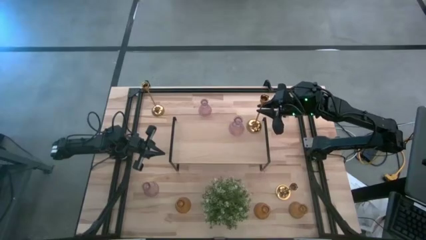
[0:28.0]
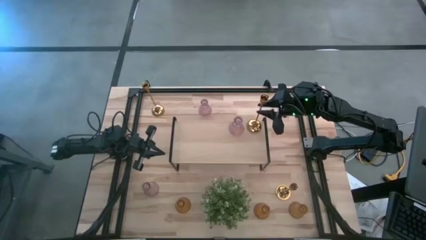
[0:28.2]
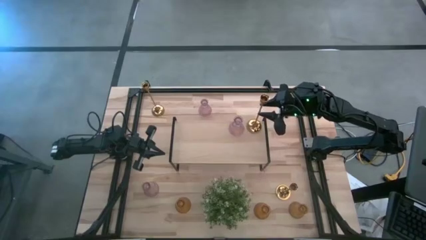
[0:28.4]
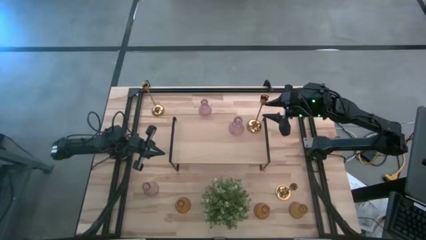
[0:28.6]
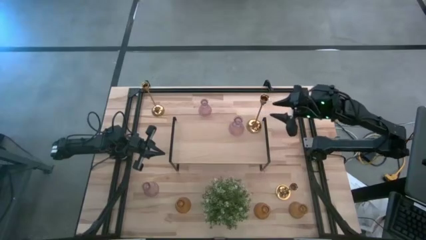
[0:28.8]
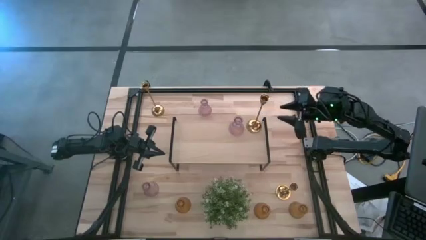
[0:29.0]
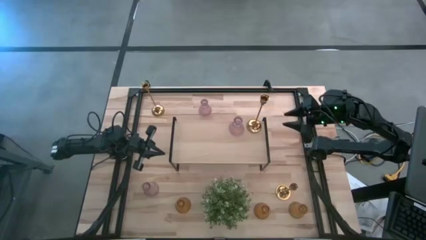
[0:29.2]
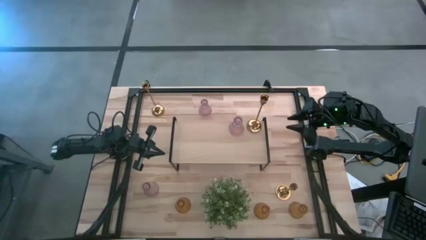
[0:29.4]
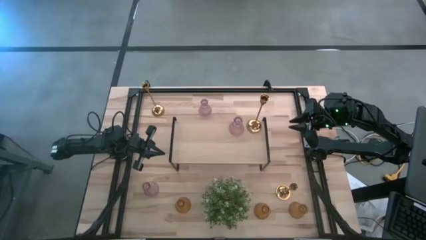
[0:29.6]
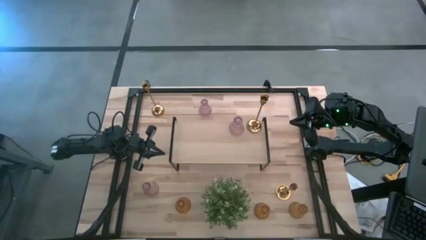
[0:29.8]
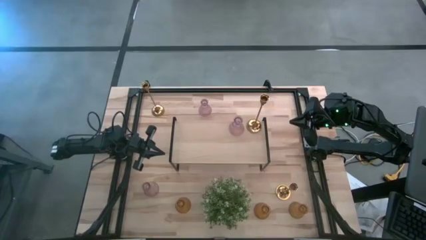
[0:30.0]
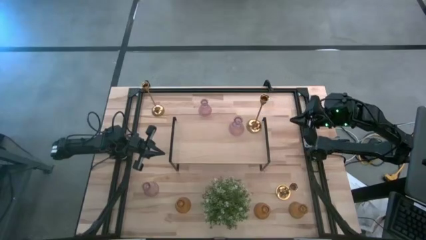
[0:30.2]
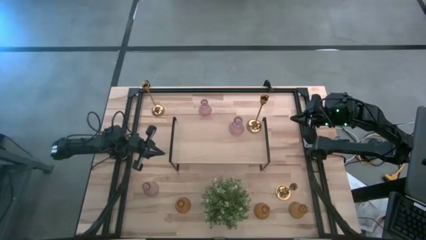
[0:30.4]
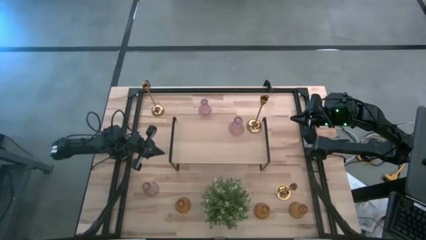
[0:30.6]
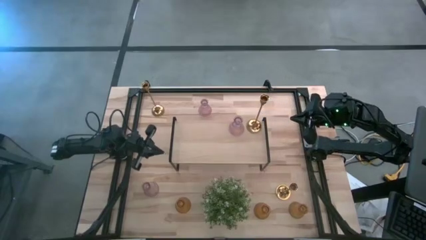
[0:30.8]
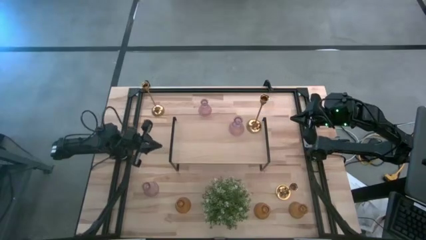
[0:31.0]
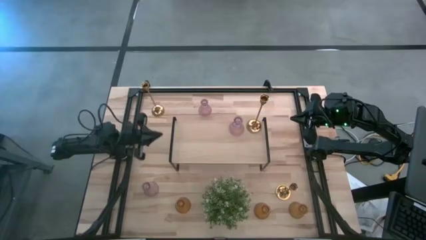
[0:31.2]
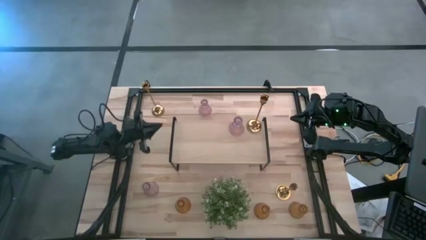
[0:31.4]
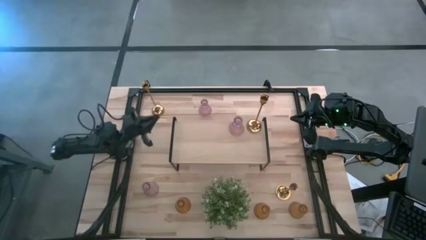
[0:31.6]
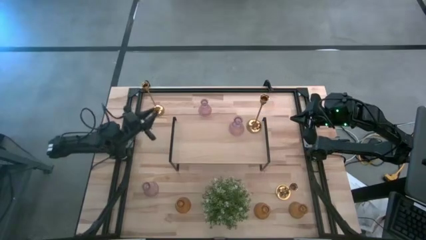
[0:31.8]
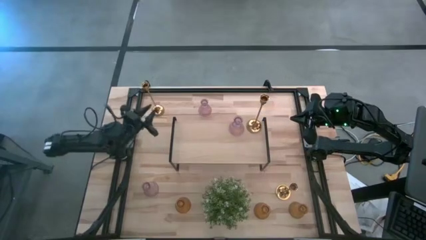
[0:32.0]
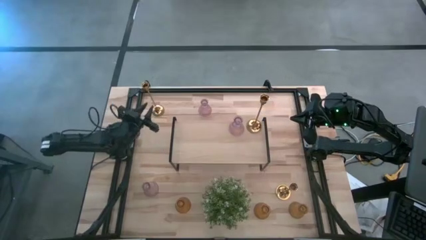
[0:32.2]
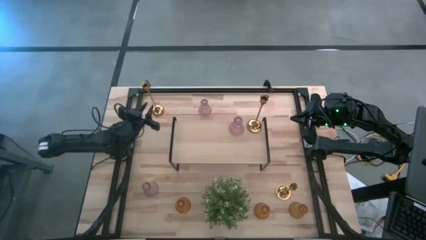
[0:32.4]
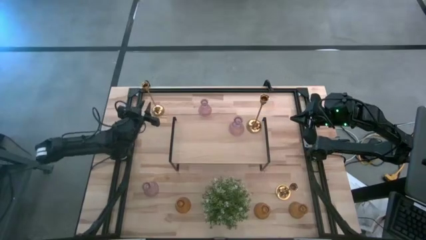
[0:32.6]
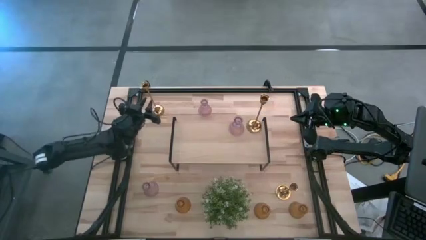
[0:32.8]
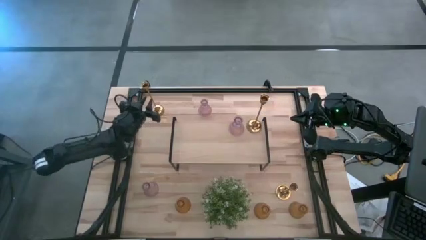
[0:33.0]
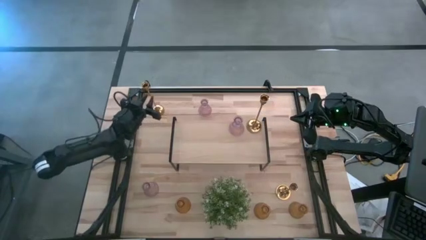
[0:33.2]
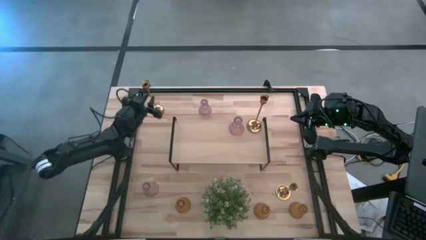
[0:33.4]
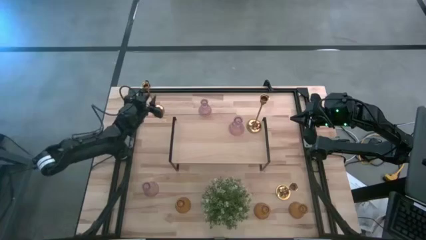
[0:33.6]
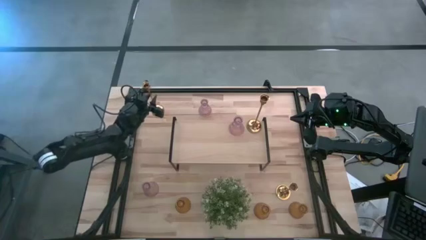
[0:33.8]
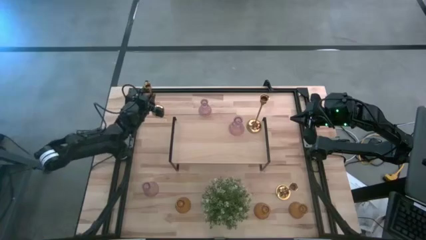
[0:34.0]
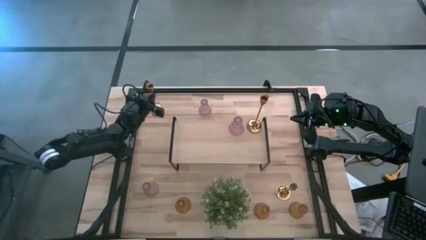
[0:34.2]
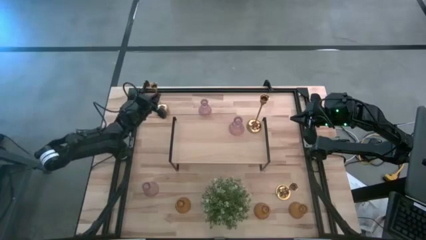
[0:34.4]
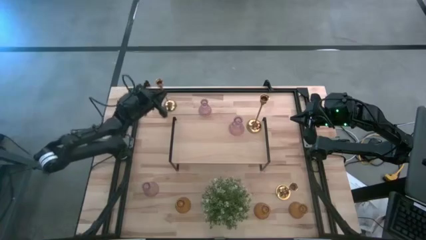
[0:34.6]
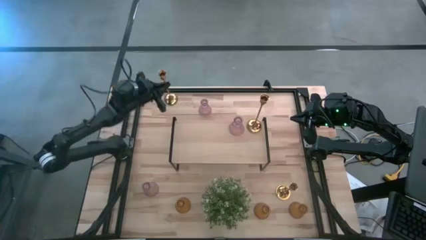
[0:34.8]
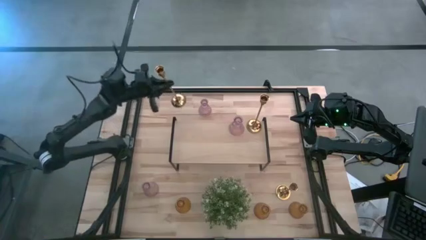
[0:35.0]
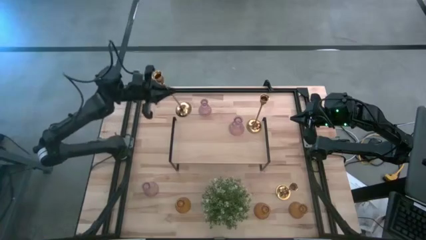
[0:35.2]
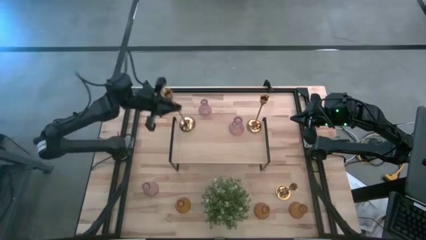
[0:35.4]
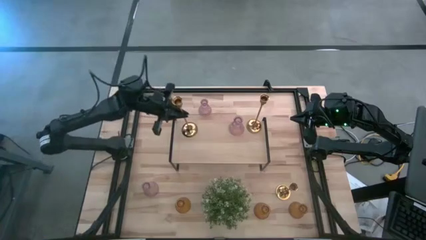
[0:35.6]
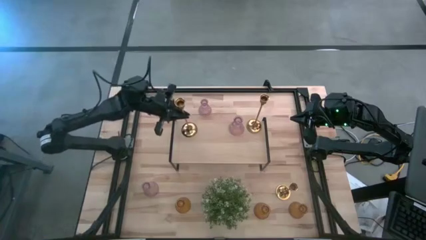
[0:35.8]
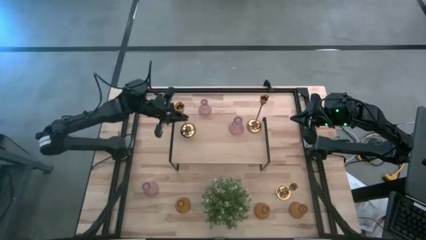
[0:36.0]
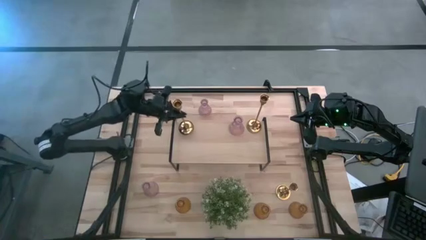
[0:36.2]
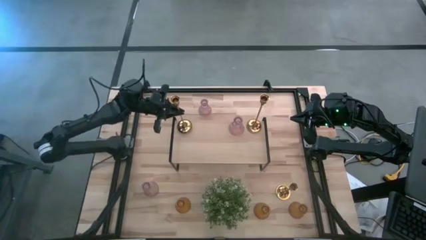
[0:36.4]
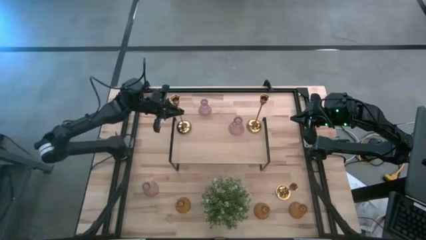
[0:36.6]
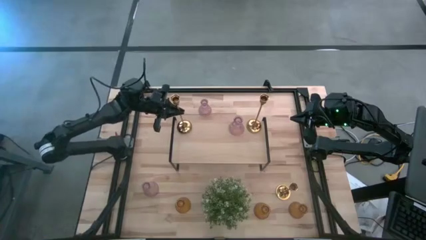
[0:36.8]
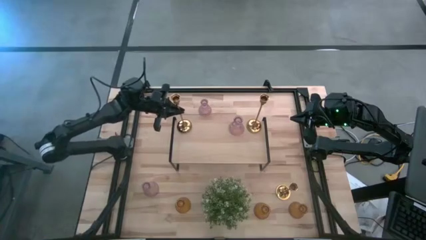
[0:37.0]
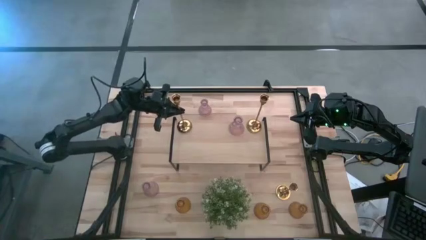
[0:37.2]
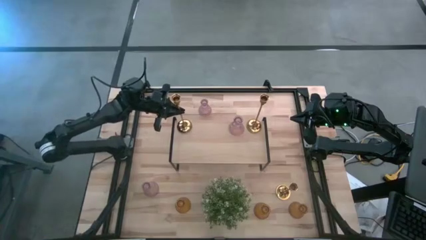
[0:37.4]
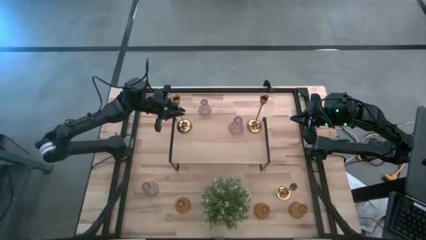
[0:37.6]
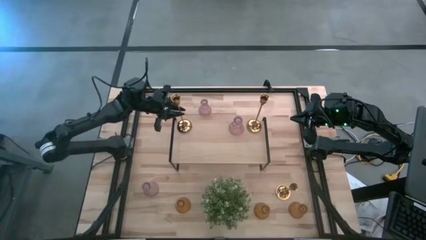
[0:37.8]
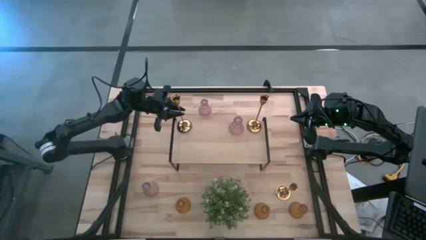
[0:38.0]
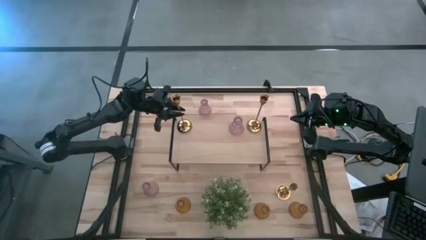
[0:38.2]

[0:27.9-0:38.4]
Task: Pick & Place candle stick holders
Put the top gold candle holder on the shelf

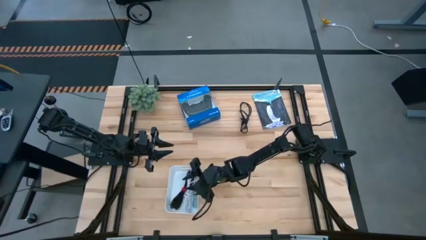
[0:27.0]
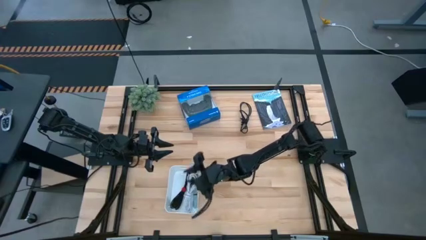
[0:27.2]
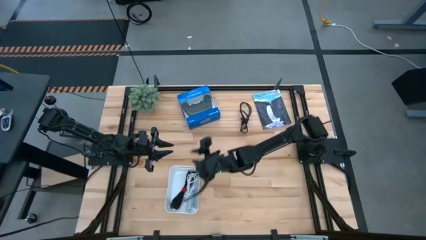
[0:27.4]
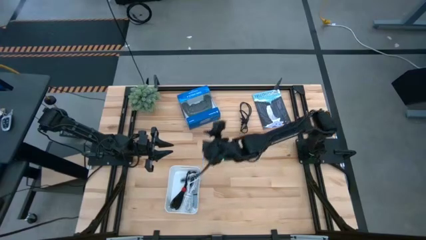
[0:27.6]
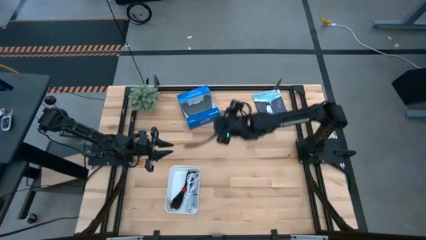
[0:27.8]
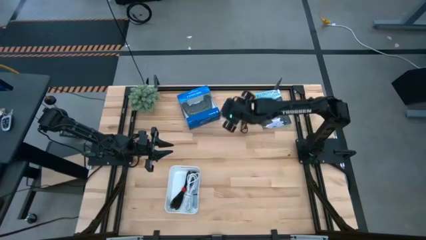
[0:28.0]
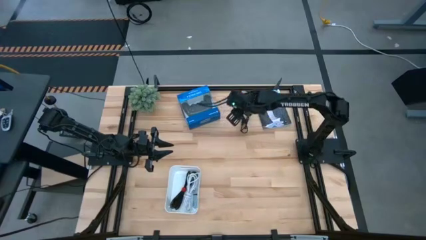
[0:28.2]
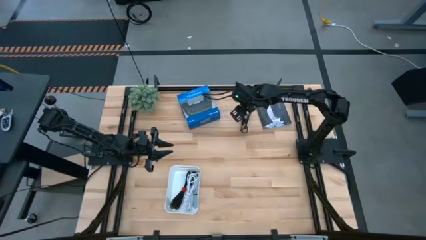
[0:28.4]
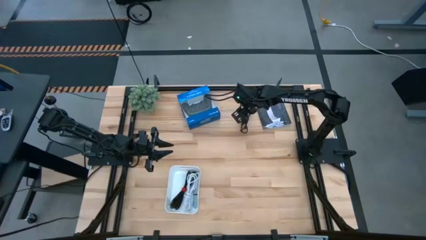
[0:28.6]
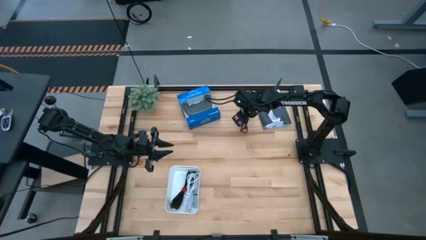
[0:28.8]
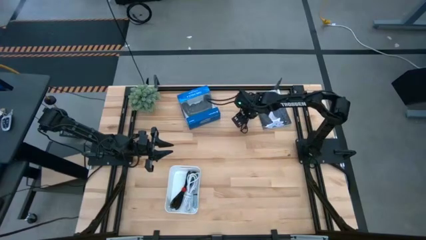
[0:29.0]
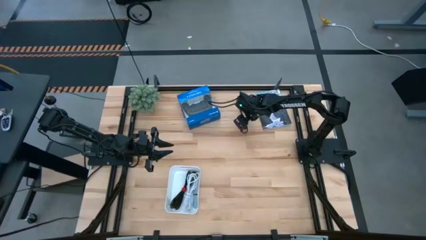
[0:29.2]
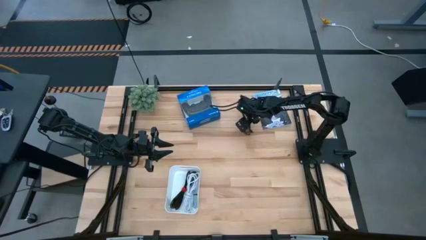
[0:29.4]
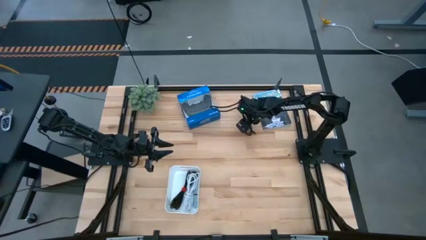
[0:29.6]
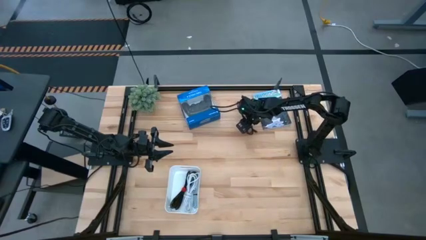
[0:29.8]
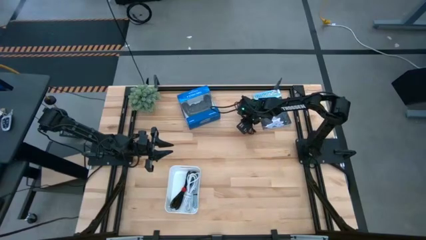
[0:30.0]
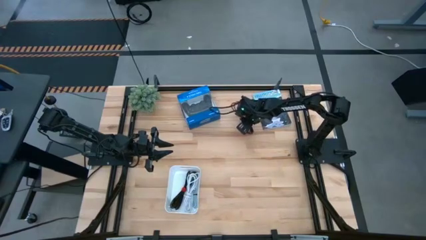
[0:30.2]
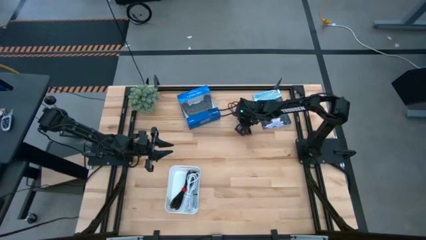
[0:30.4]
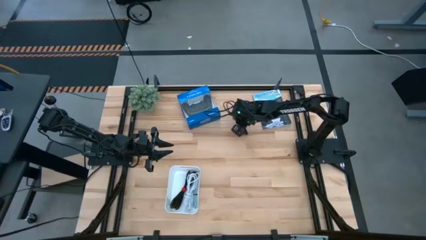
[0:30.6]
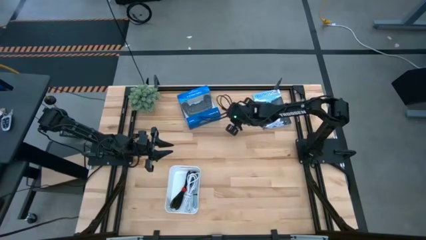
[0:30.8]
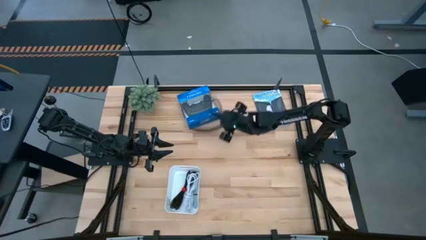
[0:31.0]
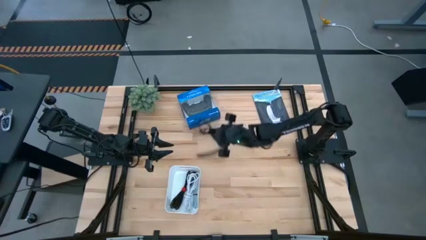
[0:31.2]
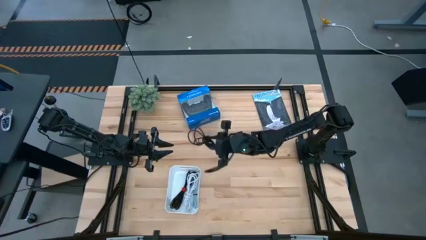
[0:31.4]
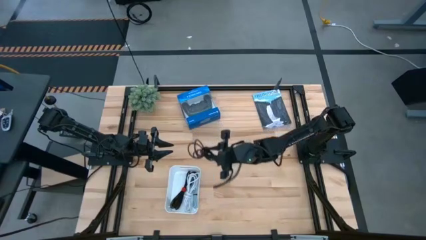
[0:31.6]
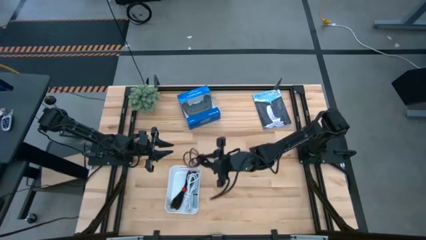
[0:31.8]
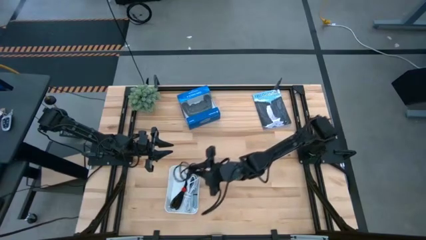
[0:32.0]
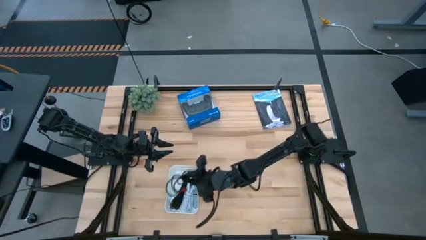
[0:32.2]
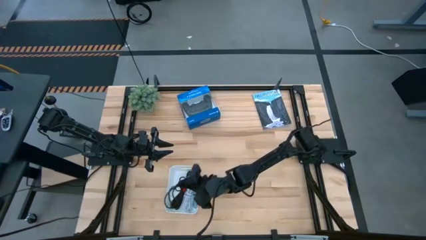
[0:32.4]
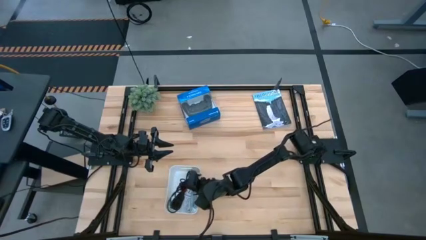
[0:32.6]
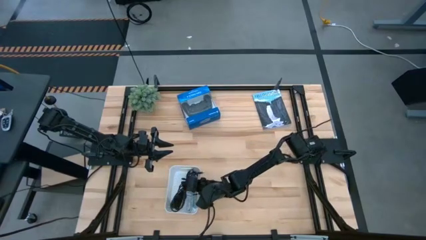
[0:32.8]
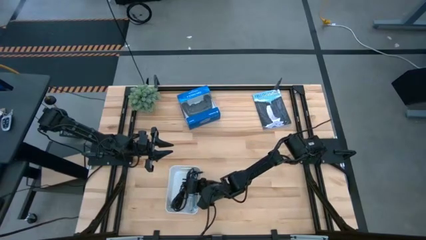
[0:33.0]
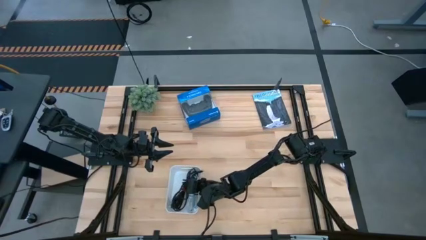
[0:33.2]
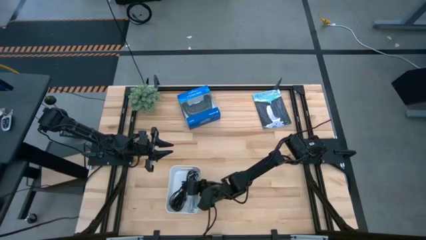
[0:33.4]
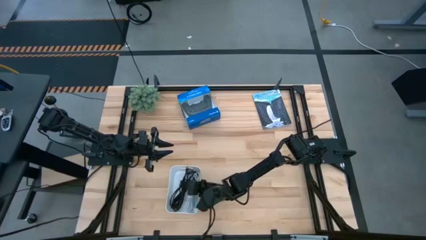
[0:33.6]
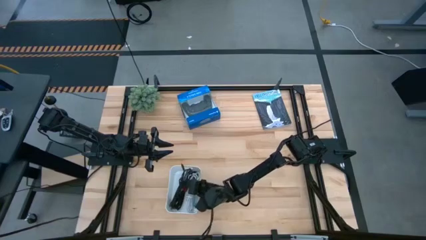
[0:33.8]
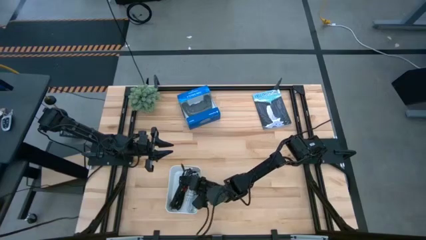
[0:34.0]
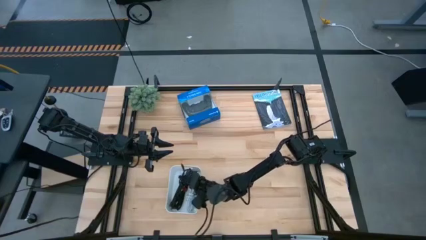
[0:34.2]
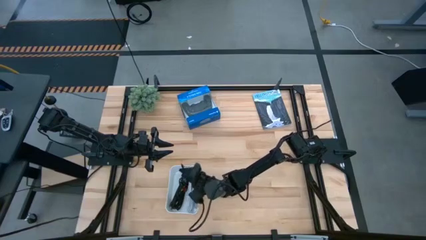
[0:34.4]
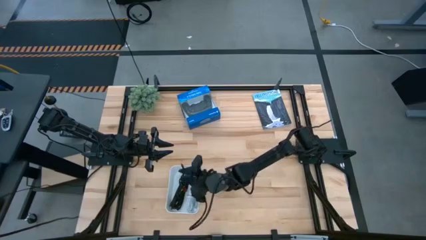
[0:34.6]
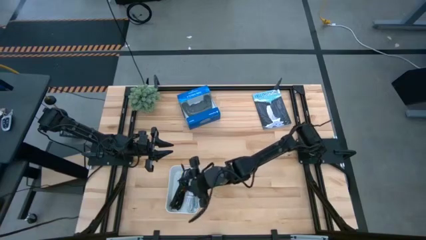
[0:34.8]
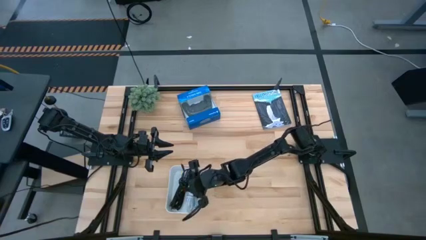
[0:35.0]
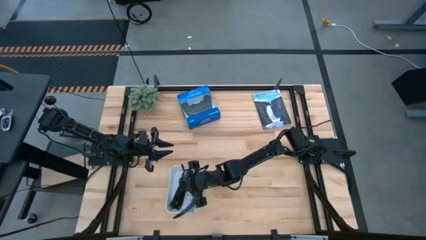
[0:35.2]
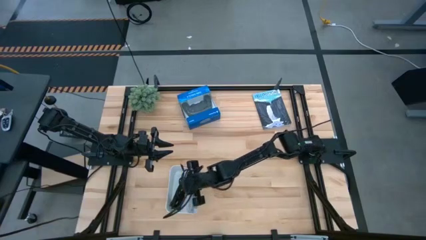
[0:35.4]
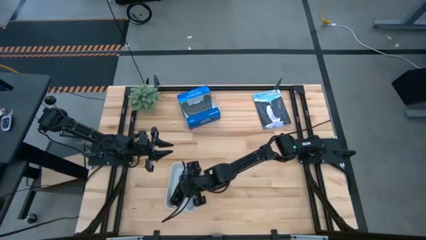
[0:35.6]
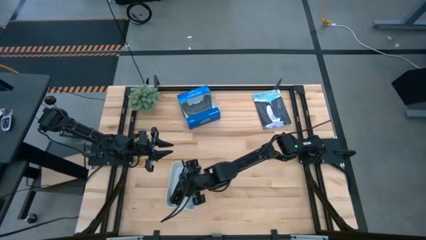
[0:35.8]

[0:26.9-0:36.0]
Task: Pick and place USB-C Cables
Put the black charger cable into the white bin
